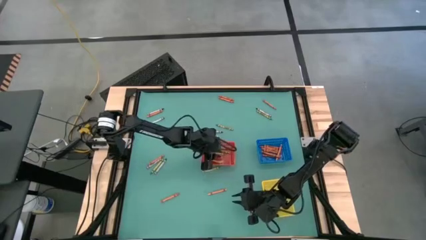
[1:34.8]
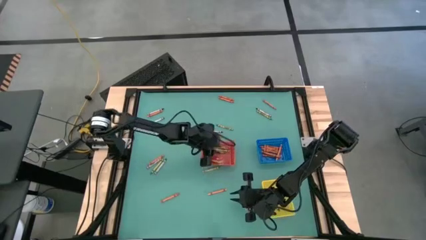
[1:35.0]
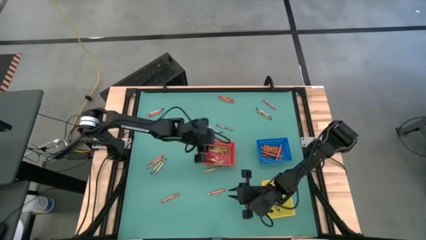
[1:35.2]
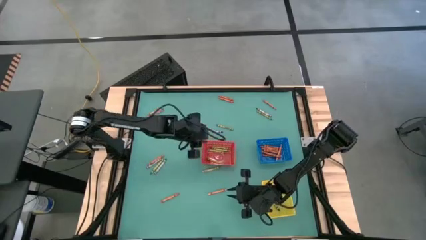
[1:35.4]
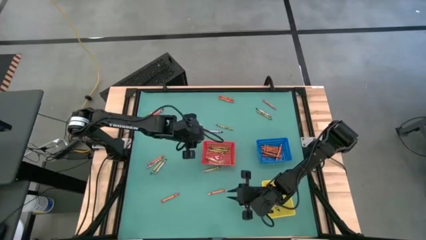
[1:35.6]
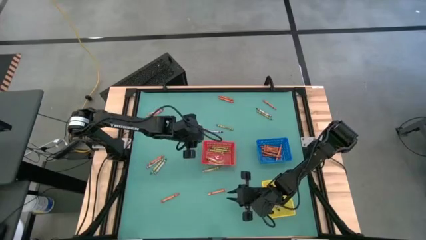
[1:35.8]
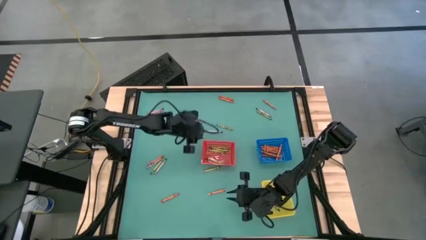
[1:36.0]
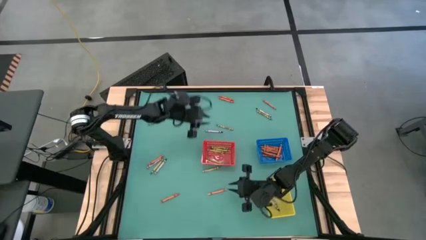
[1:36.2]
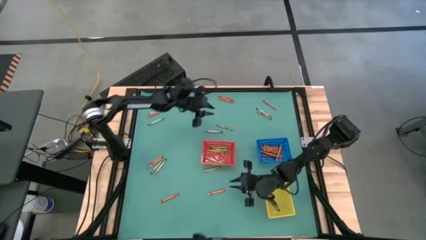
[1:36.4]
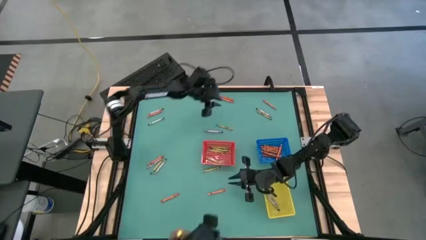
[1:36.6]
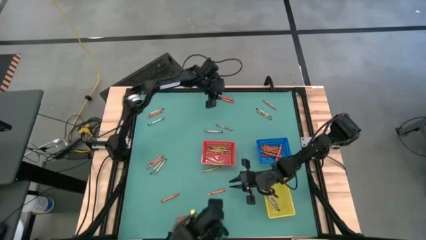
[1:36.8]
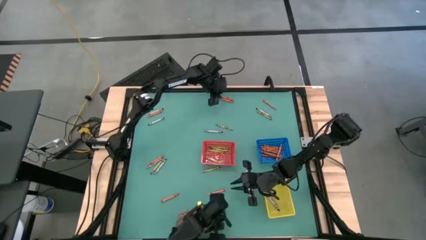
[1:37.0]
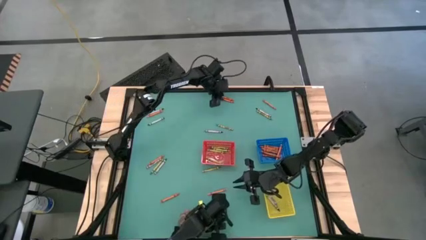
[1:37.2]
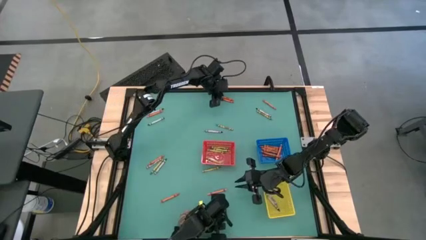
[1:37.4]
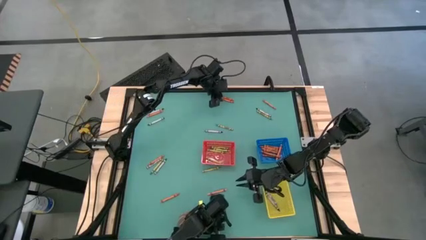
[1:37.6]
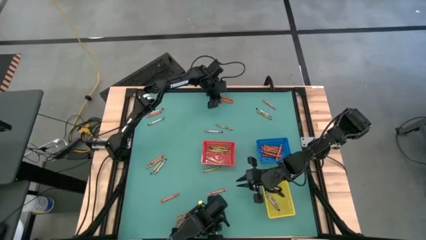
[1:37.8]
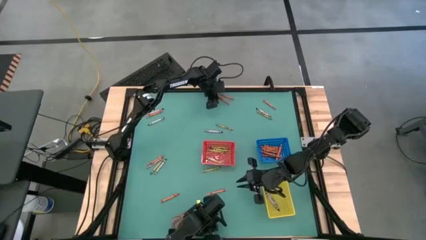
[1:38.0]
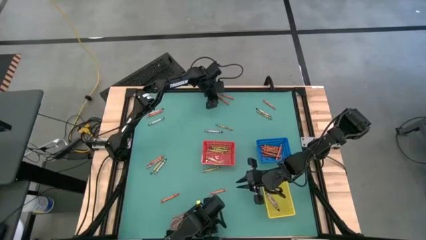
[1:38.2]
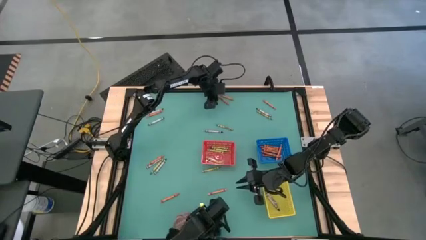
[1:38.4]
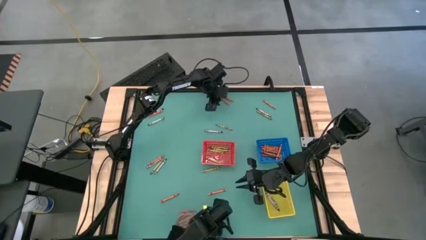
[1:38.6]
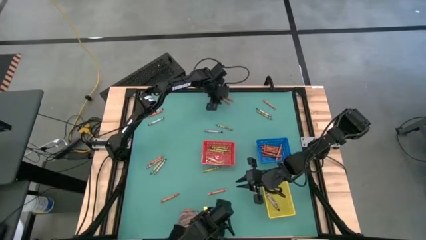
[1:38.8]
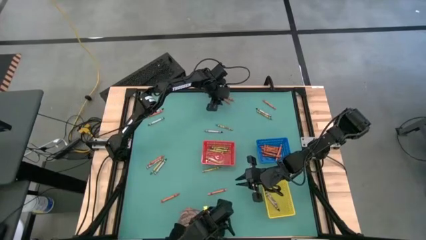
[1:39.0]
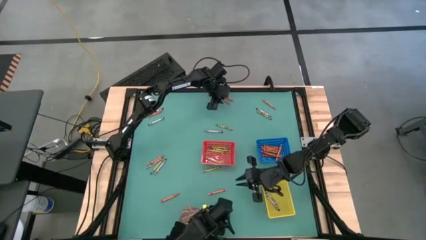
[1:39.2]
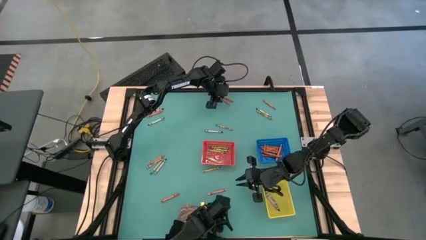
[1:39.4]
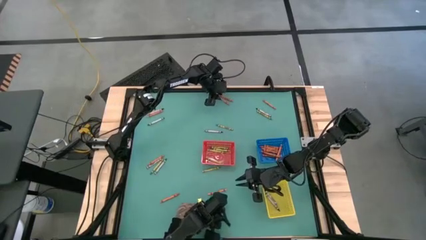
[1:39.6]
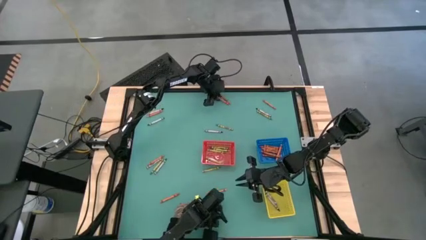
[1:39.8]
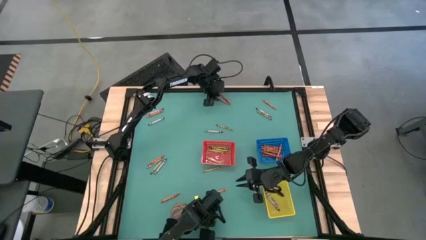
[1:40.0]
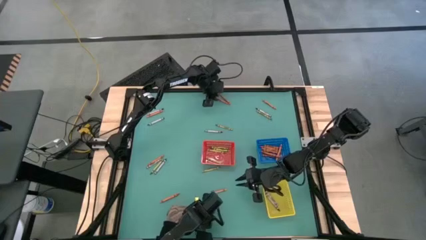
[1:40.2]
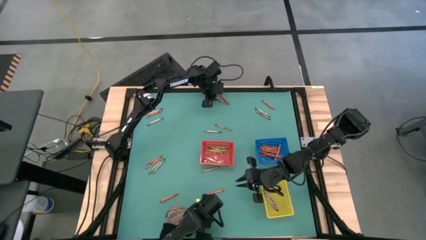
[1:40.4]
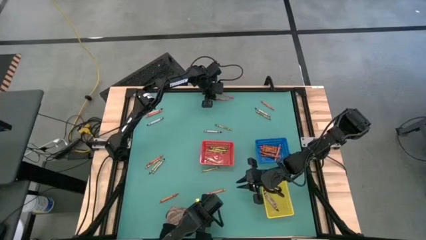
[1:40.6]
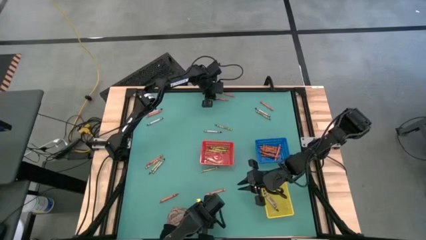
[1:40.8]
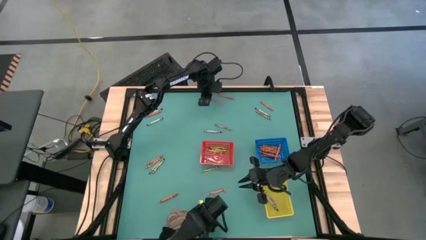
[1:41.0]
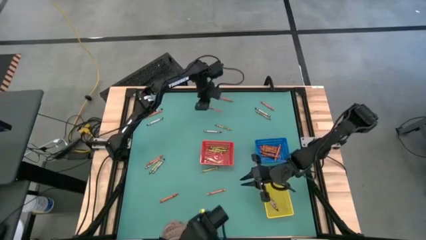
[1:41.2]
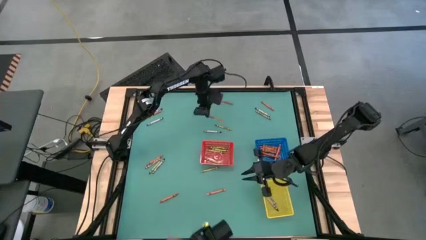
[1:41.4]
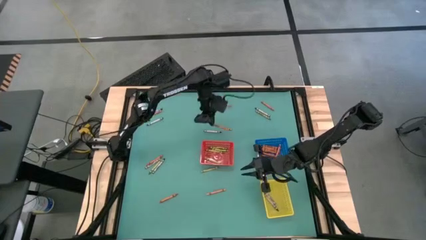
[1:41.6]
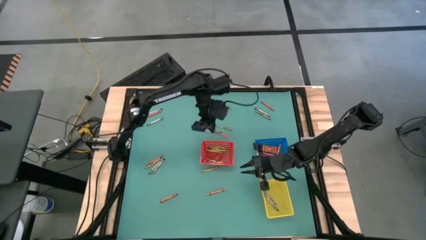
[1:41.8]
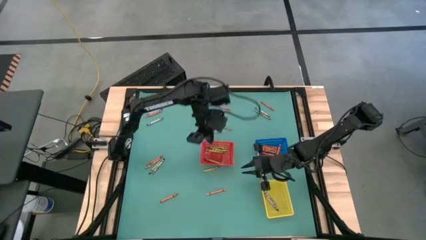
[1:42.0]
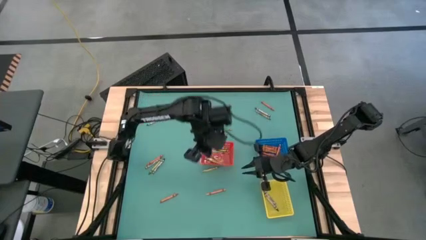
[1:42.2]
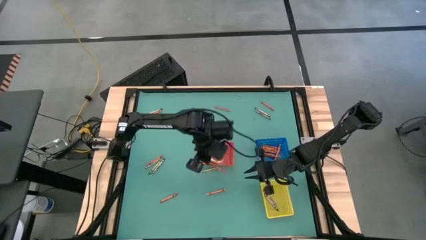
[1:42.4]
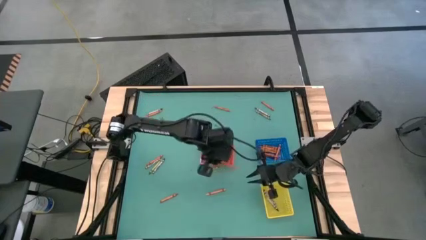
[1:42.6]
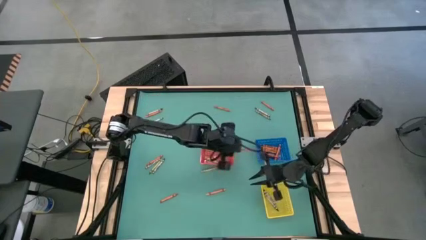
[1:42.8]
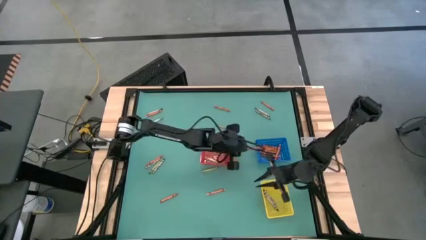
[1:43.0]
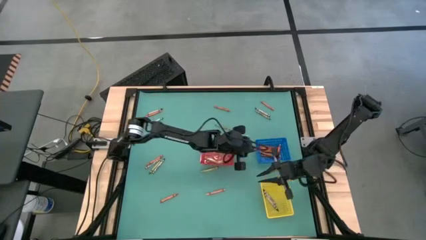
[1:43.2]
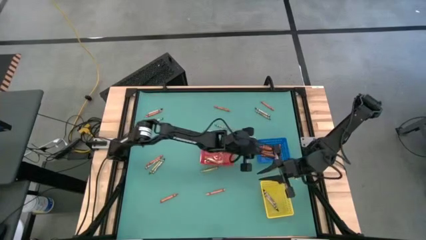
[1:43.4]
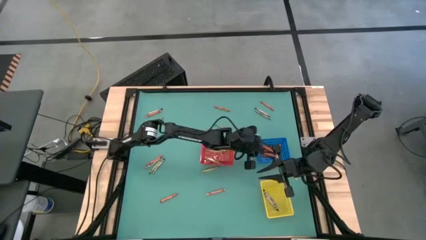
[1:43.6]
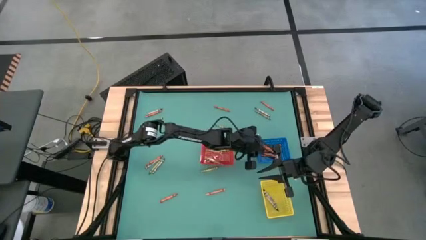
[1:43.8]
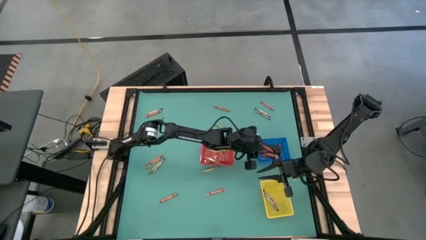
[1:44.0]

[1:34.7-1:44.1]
Task: Sort crayons
Put the orange crayon into the blue basket

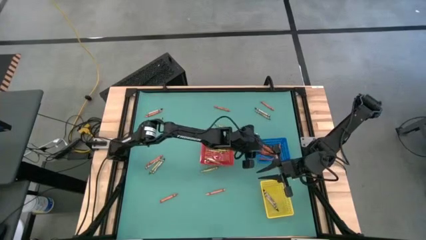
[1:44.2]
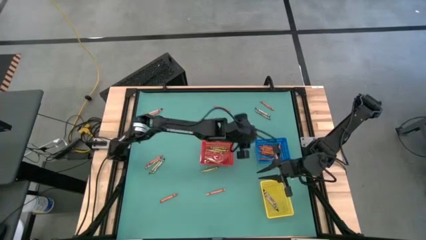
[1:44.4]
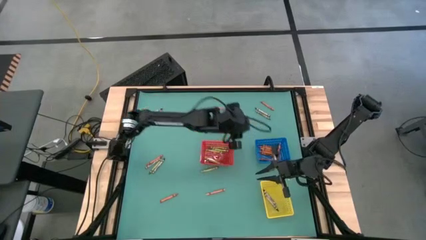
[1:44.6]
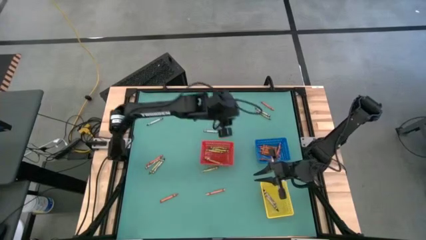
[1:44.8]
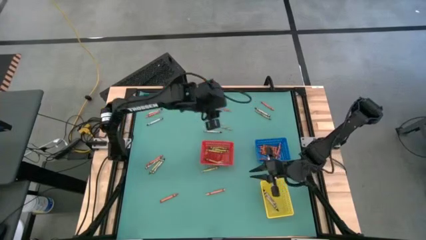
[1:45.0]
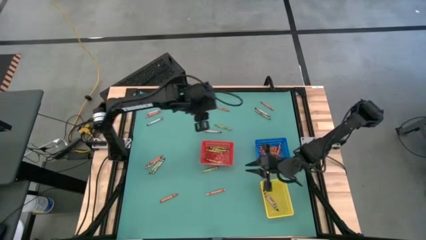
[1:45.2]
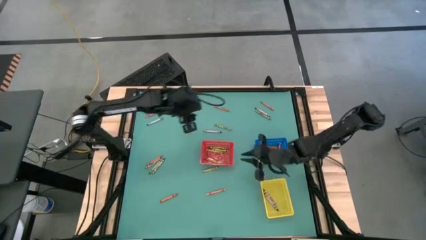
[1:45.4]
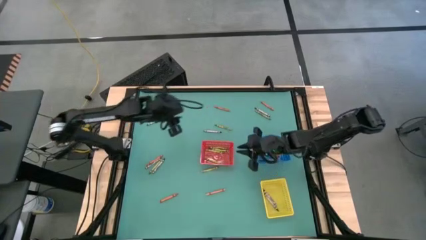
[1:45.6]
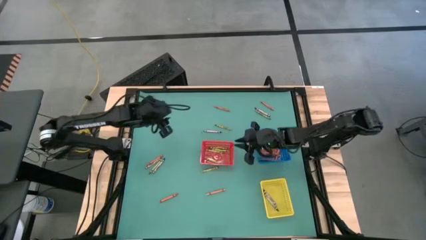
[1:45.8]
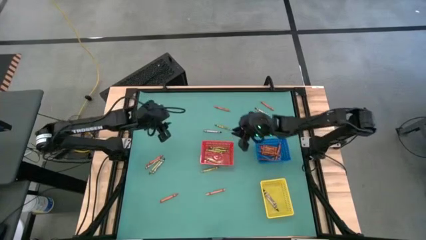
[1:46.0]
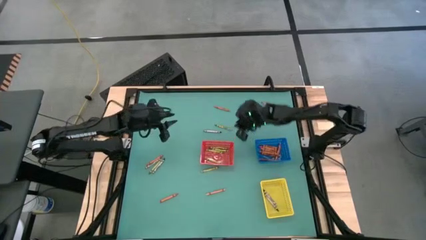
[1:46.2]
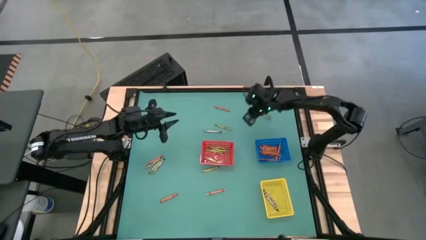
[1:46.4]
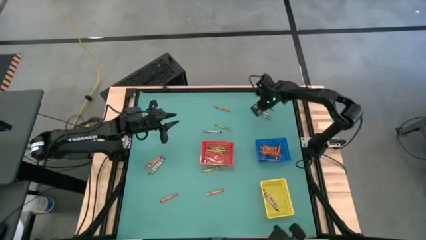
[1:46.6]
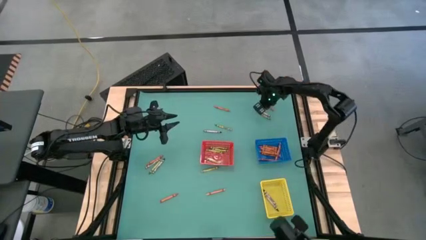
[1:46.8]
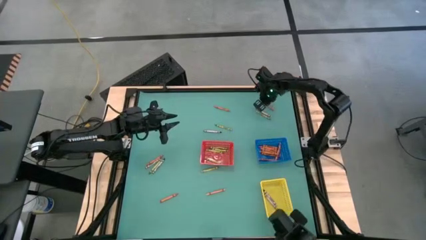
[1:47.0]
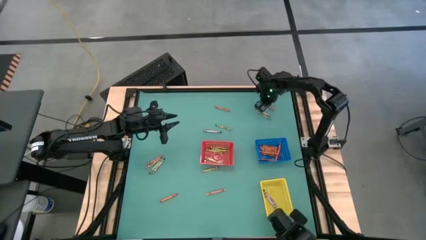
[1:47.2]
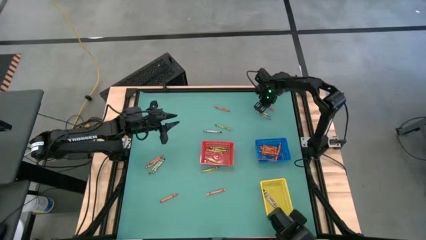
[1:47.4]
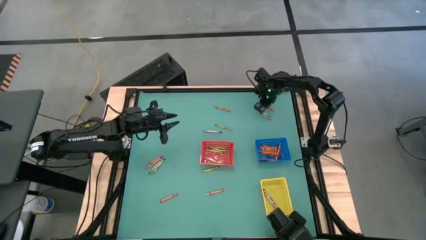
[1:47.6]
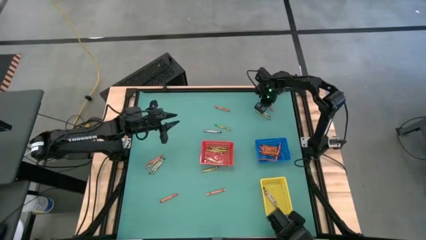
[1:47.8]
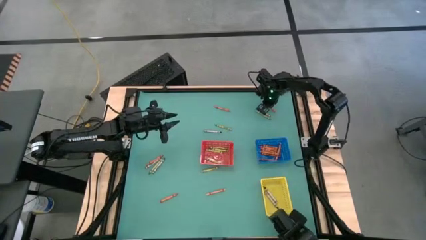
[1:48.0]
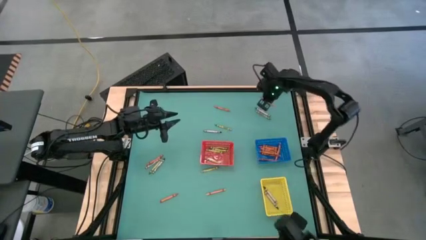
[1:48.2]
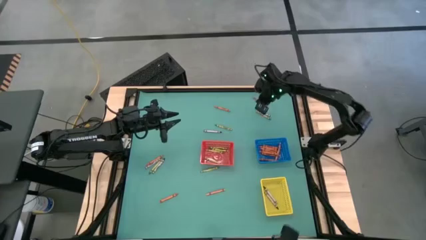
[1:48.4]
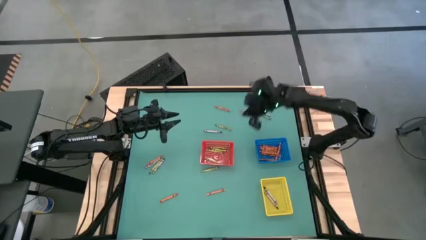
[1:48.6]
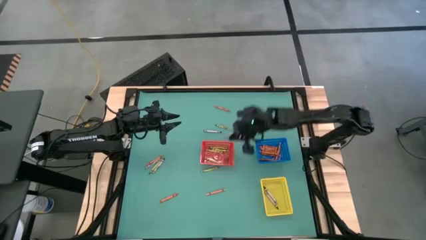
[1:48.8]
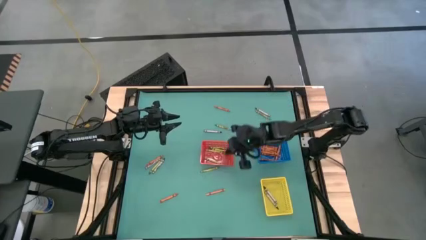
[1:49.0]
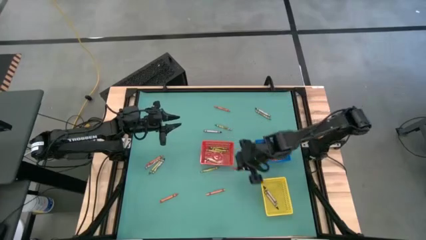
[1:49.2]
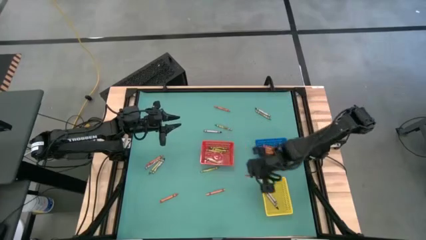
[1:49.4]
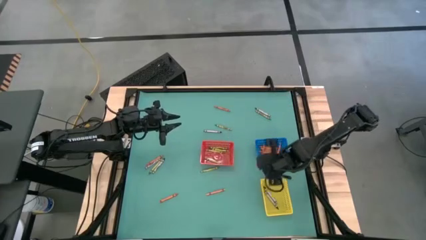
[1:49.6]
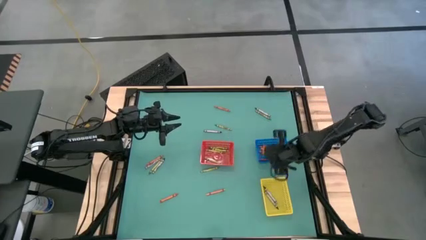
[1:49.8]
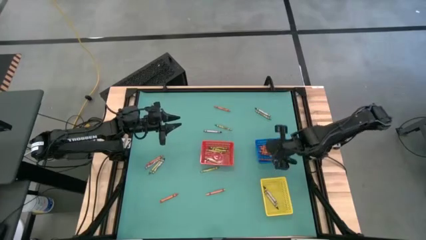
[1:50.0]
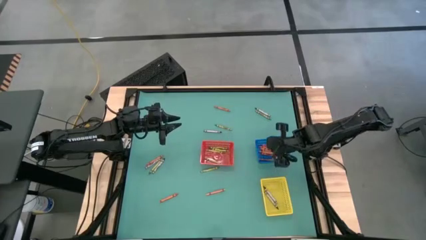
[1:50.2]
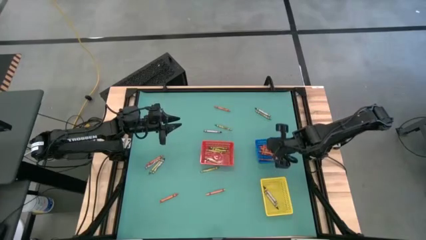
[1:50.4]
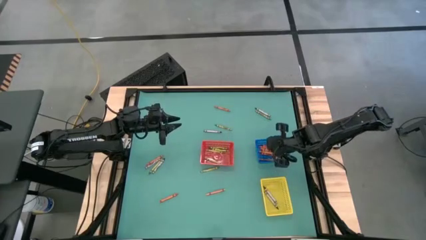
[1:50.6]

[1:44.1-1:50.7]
Put the orange crayon into the blue basket

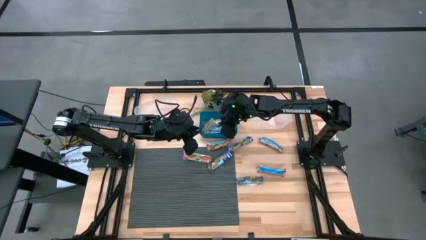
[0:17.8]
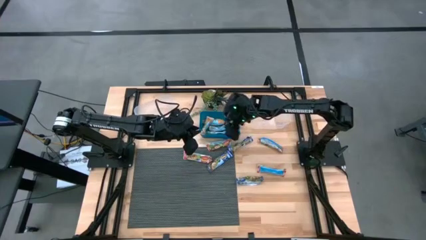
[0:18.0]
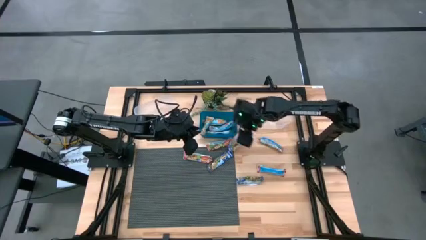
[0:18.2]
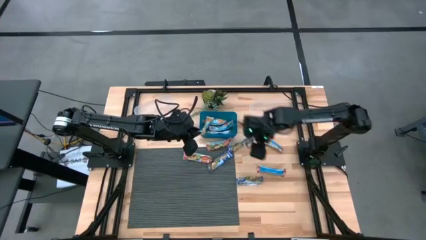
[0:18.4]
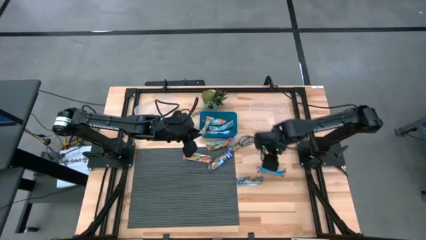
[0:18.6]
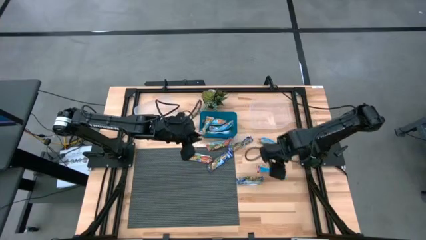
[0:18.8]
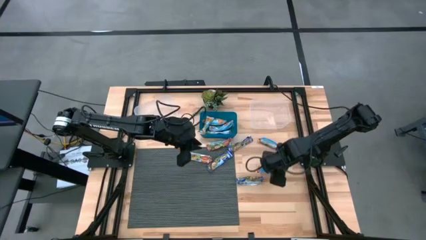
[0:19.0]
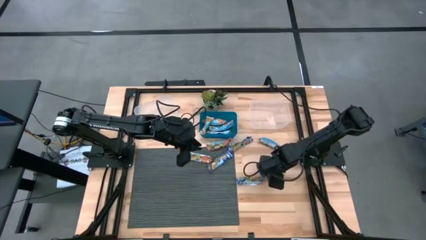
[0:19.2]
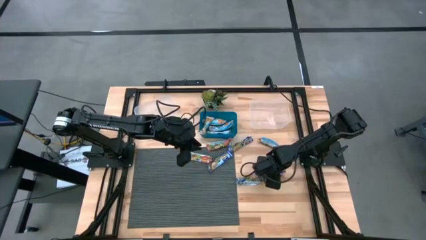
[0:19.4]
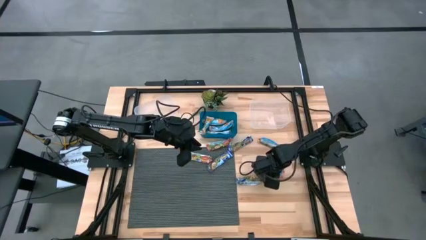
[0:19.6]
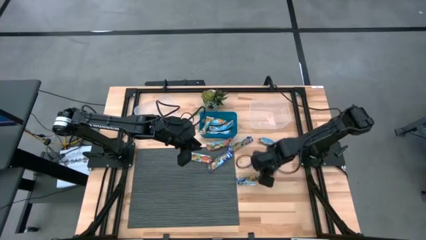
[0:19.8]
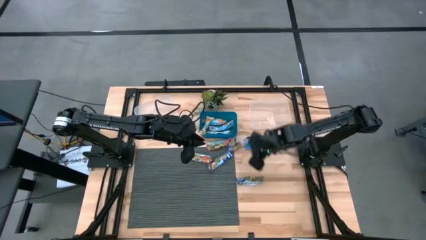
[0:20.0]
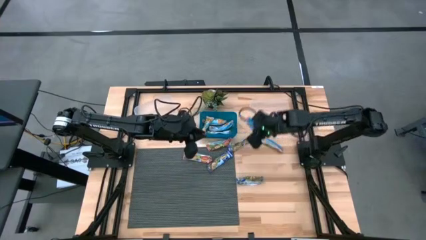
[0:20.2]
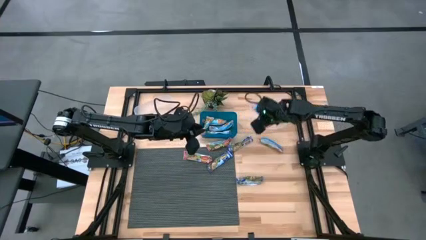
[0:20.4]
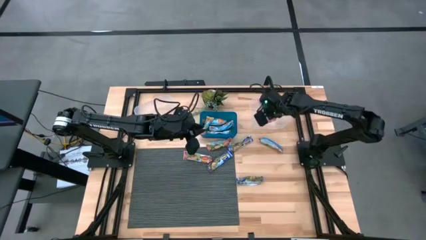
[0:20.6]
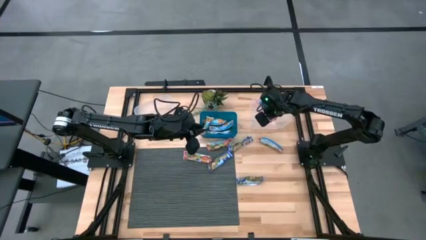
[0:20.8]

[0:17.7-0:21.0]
Task: Pick and place Granola Bars by type
Put the red granola bar into the right transparent bin
